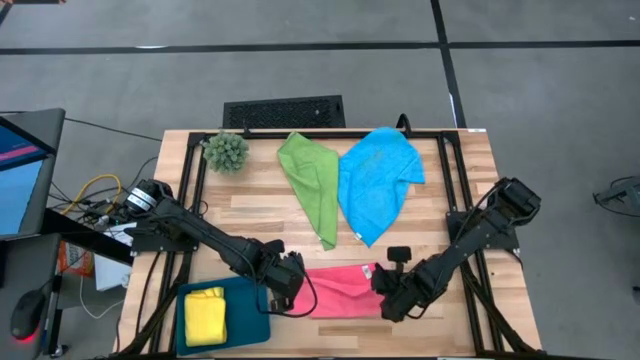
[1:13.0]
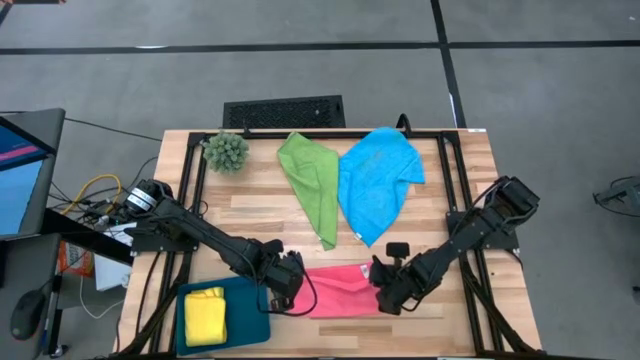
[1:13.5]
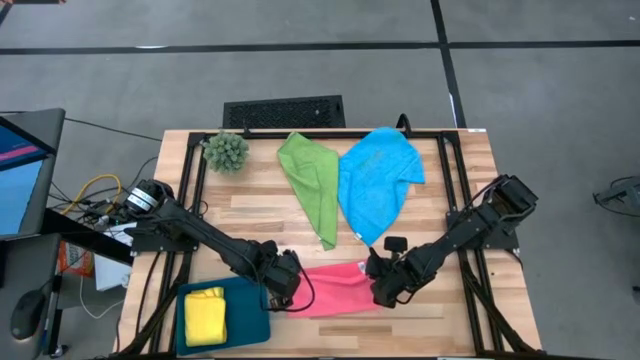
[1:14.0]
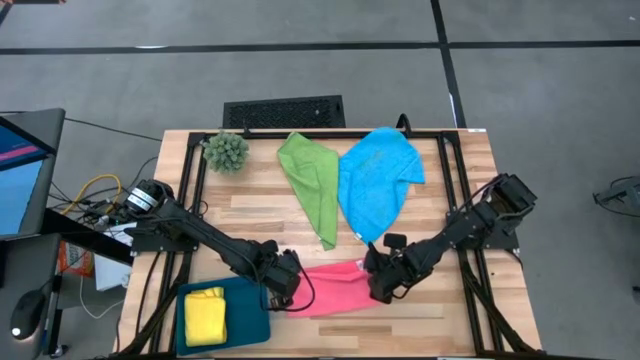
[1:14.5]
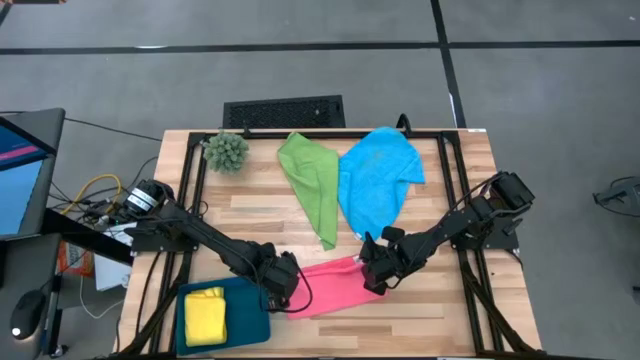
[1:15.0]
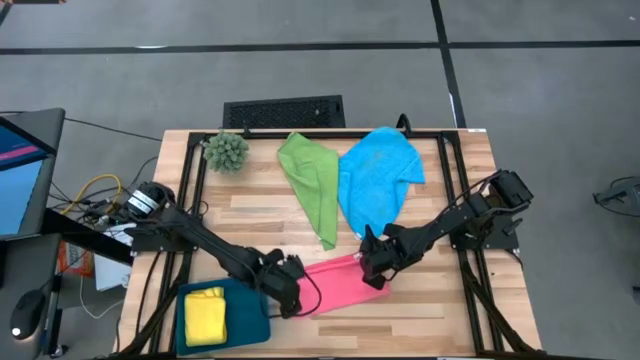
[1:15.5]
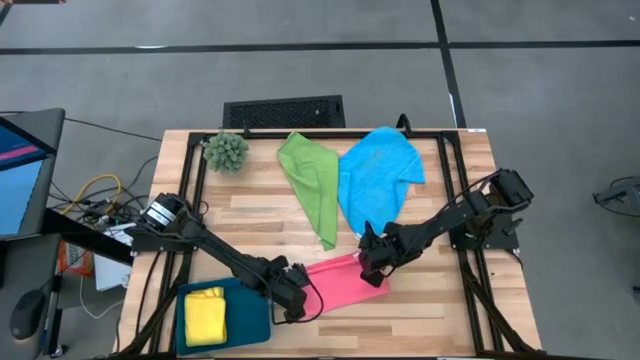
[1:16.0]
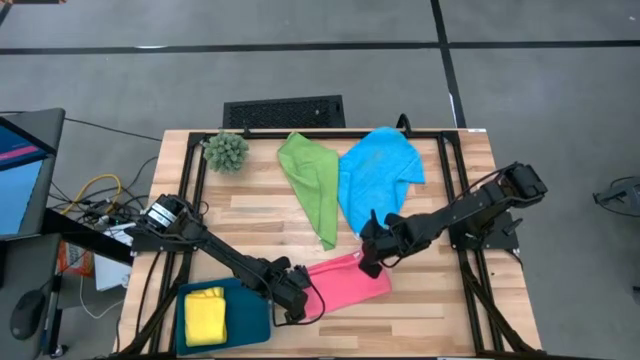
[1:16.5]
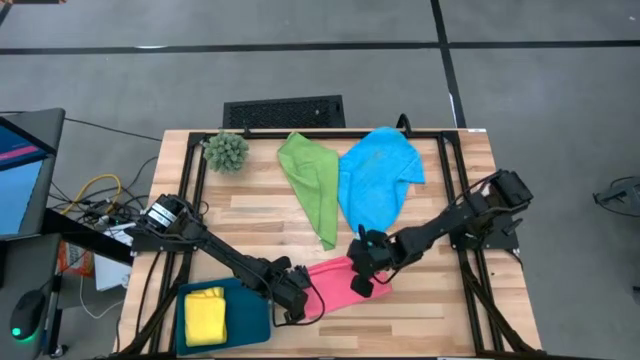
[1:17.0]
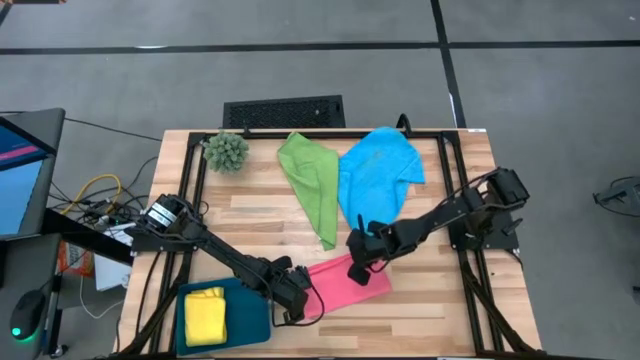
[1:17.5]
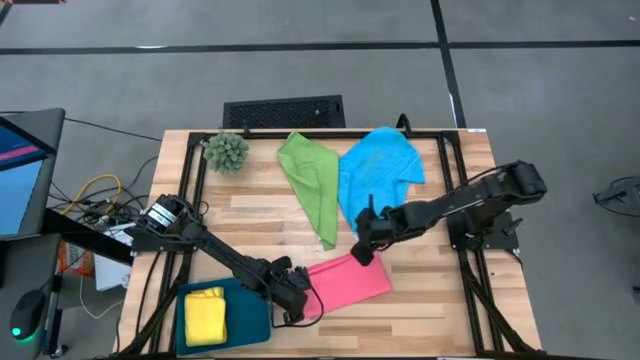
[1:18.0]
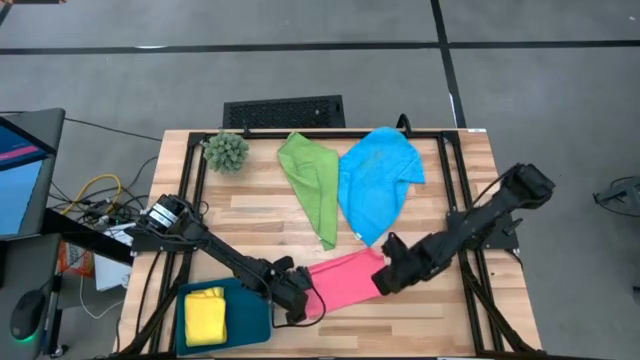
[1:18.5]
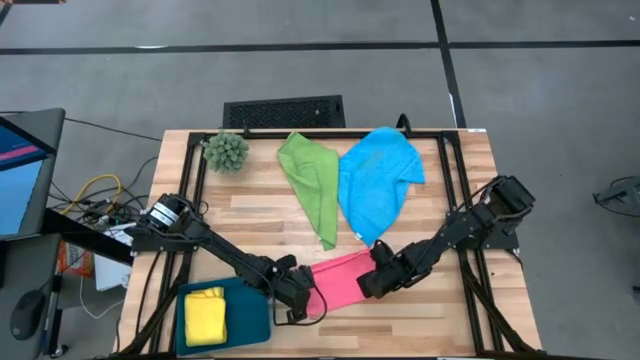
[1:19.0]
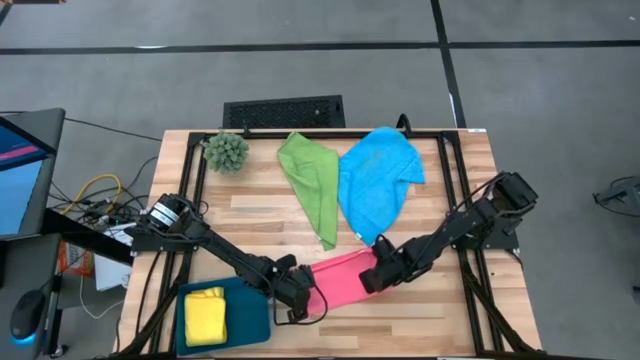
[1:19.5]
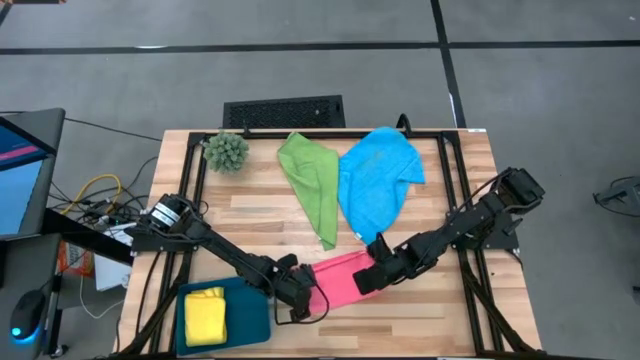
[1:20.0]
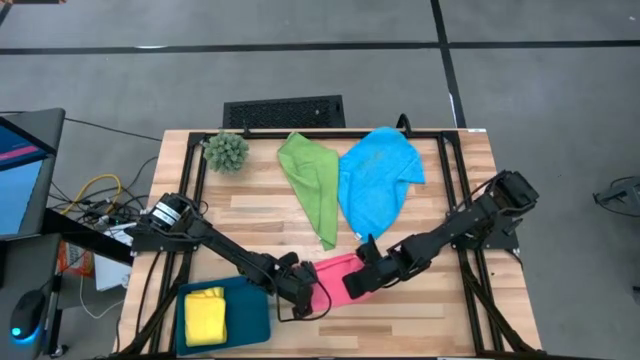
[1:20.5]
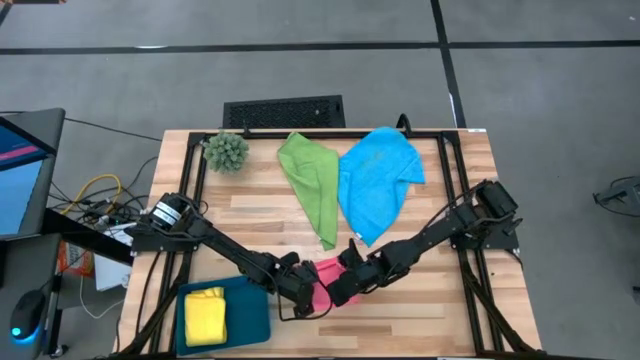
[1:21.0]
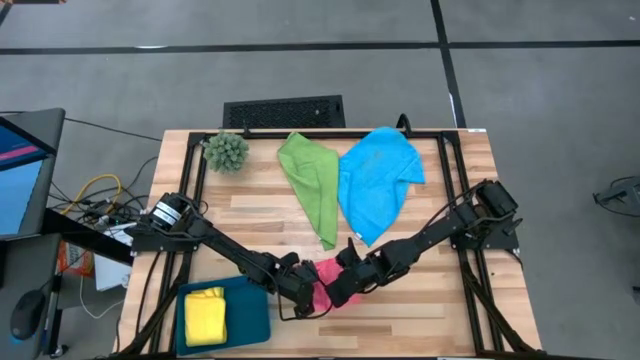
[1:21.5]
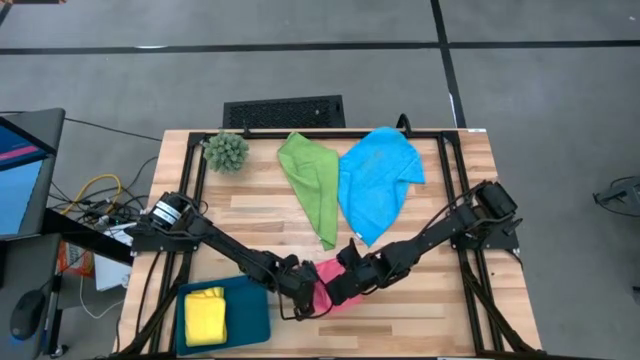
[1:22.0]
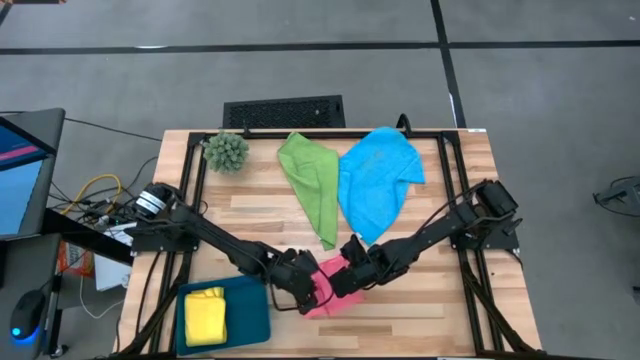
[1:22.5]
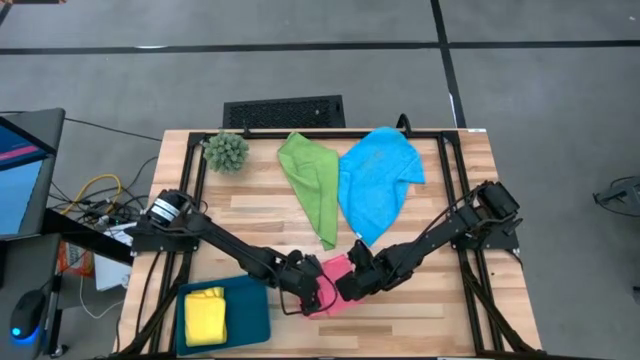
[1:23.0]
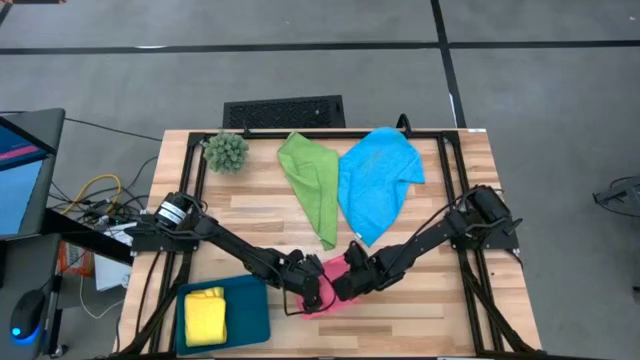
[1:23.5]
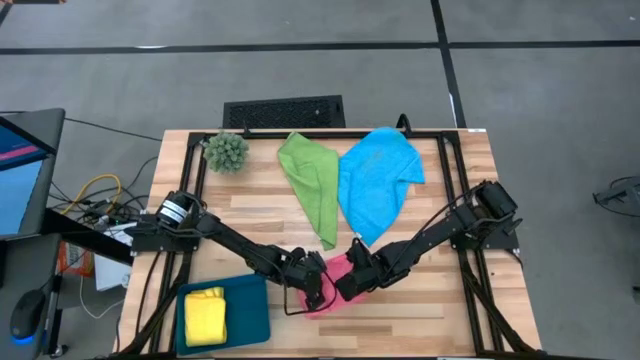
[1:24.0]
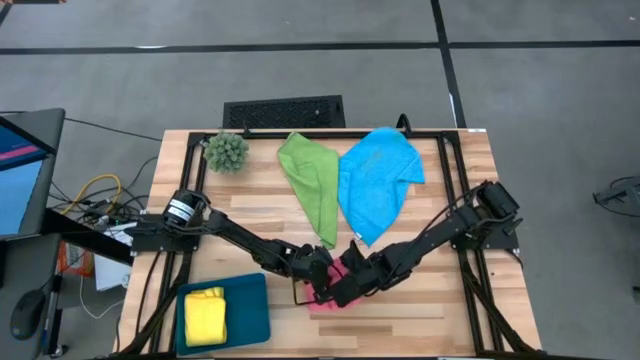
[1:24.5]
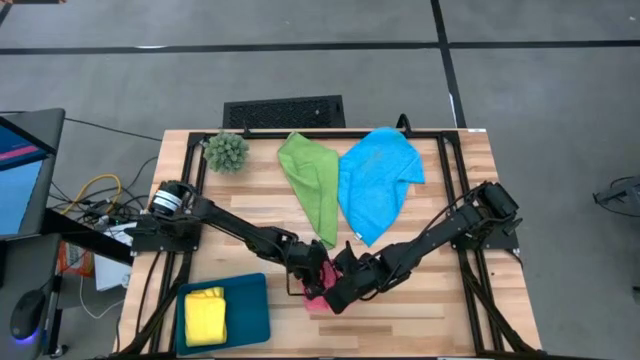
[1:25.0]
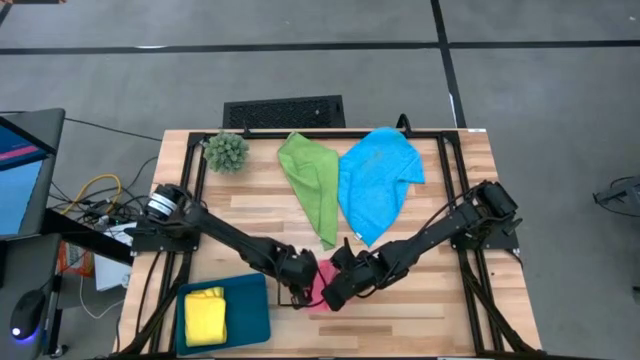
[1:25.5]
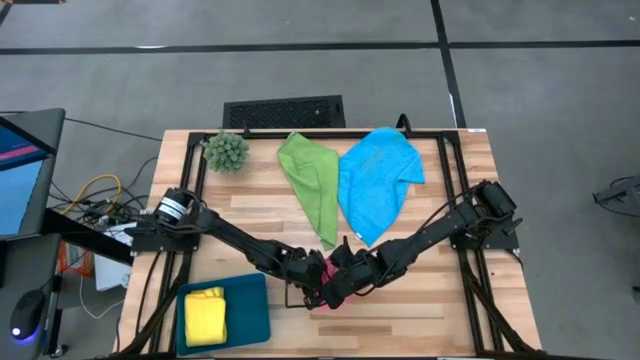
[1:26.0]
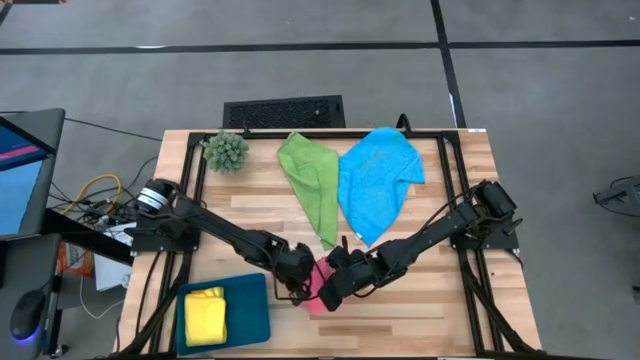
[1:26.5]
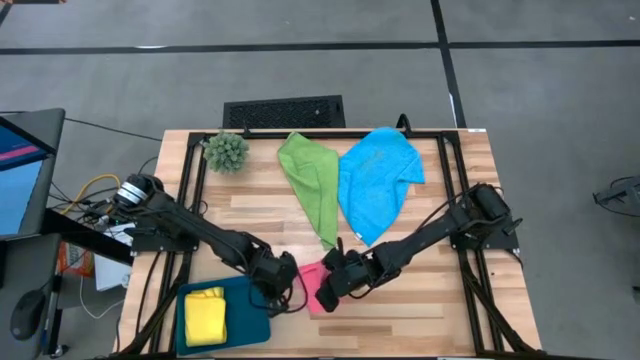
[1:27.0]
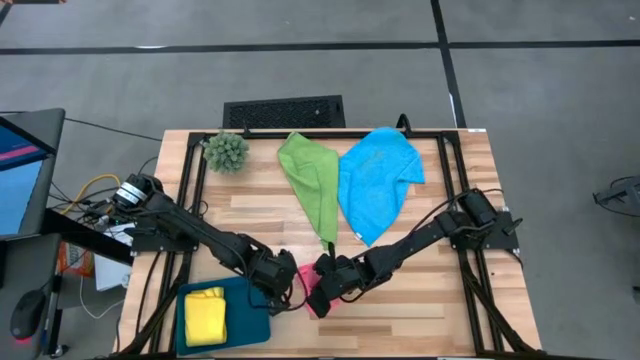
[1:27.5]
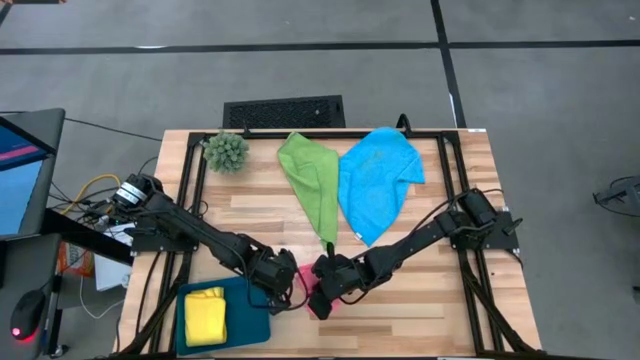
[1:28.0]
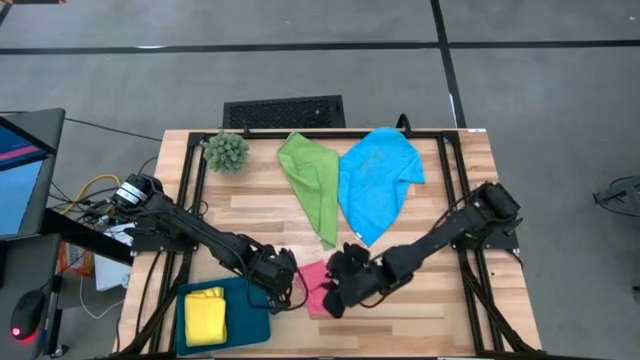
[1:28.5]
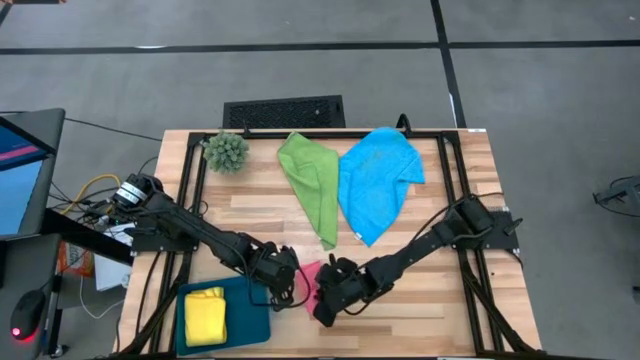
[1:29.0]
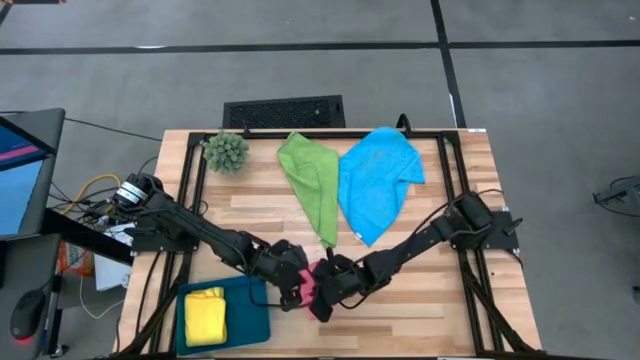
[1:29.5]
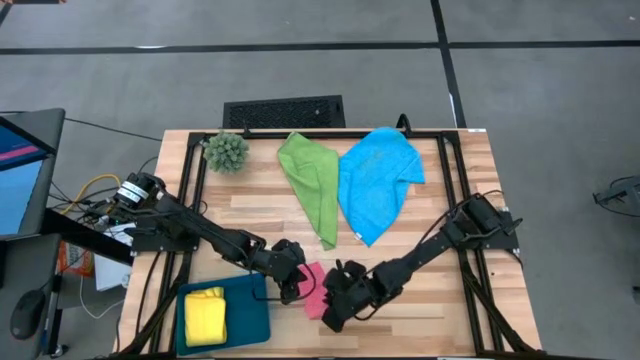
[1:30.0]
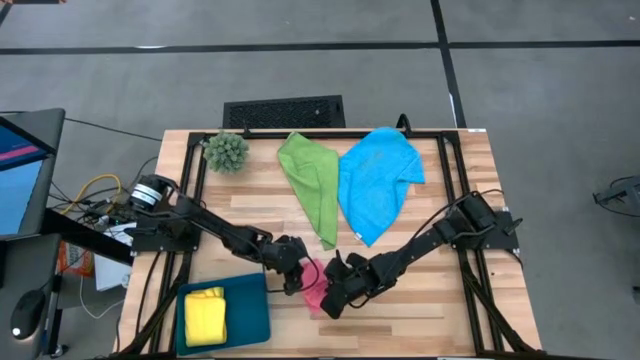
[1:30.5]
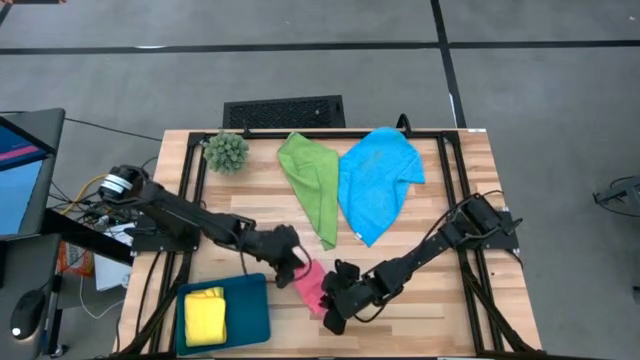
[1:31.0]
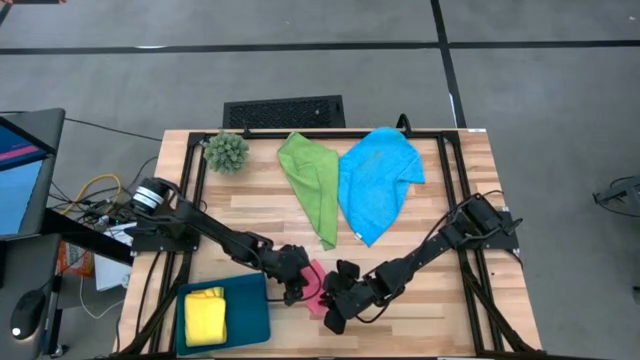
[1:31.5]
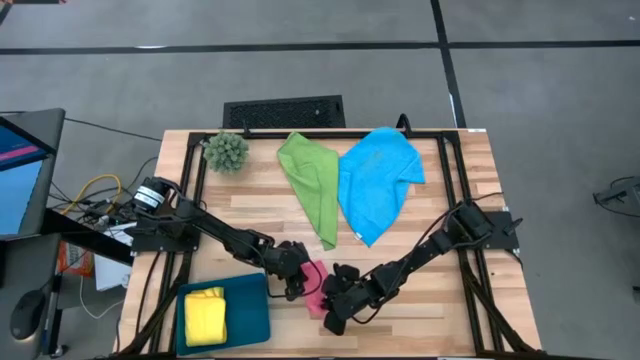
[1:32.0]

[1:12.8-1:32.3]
Task: Fold microfiber towels
Fold the pink microfiber towel

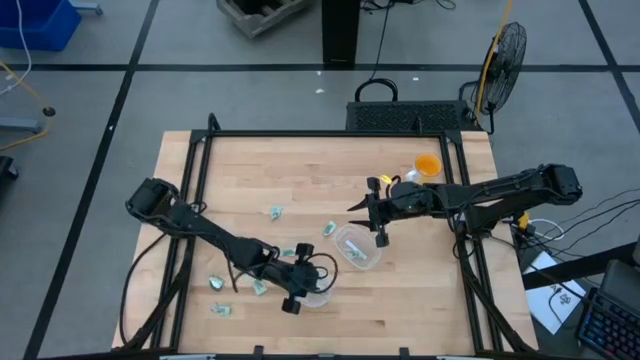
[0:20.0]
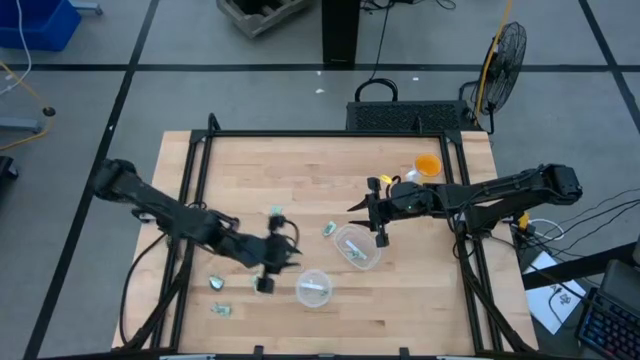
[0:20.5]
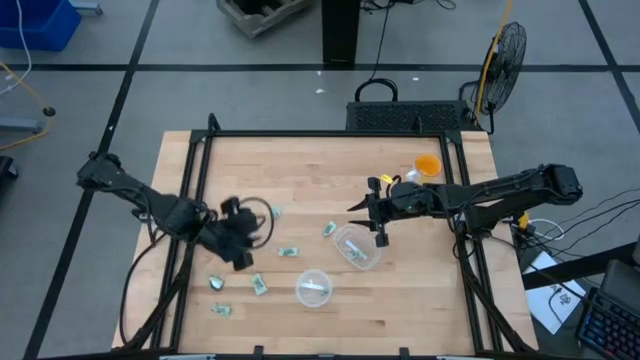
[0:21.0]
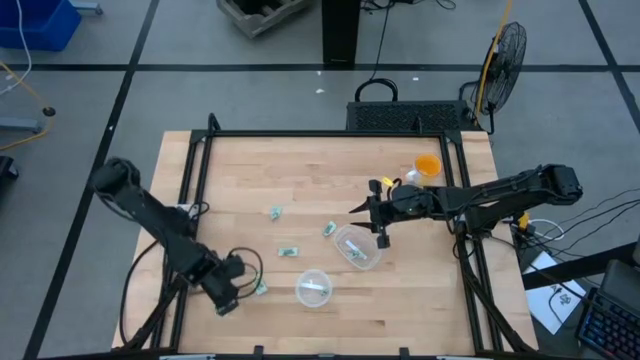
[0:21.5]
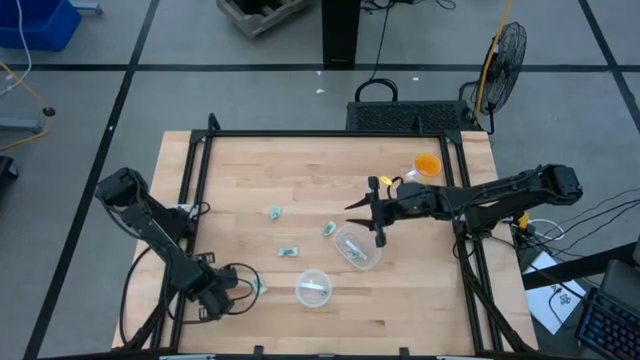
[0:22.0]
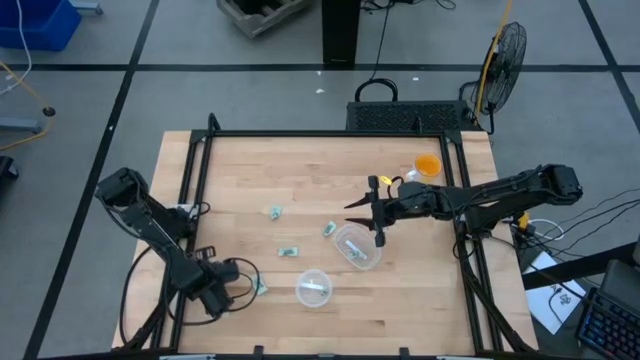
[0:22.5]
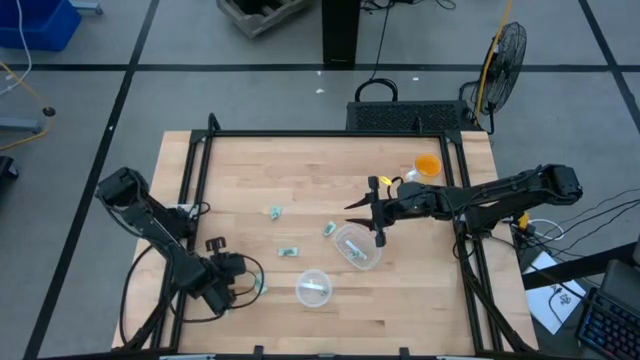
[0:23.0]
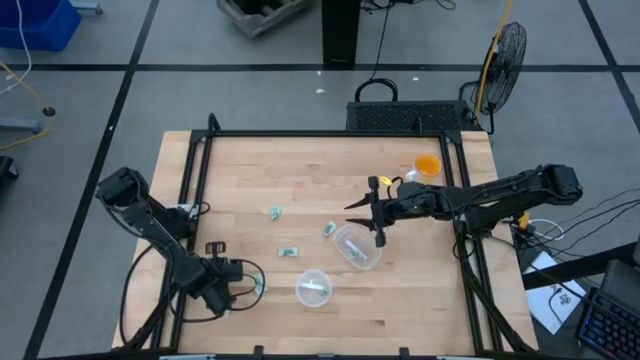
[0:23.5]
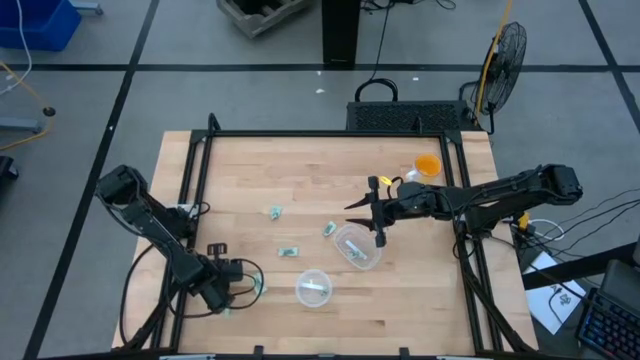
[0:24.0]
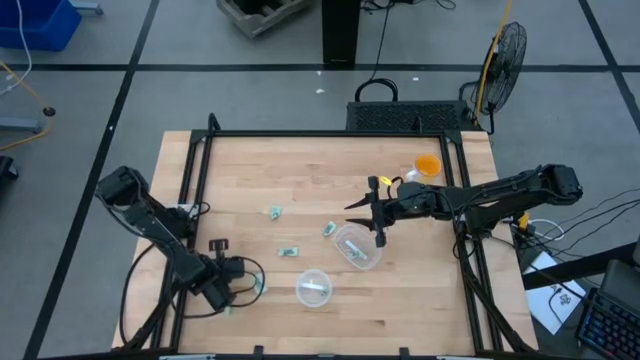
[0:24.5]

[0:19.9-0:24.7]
Task: Pick and place items into bin
Put the Stevia packet into the left transparent bin
